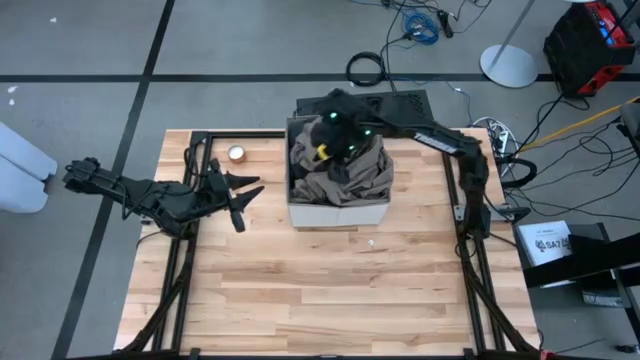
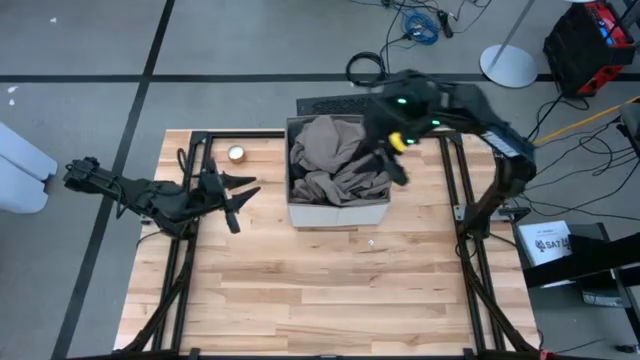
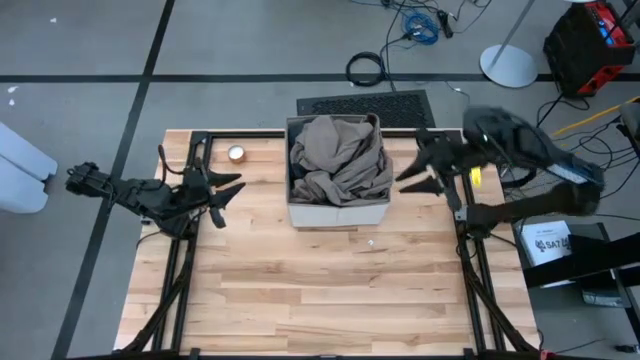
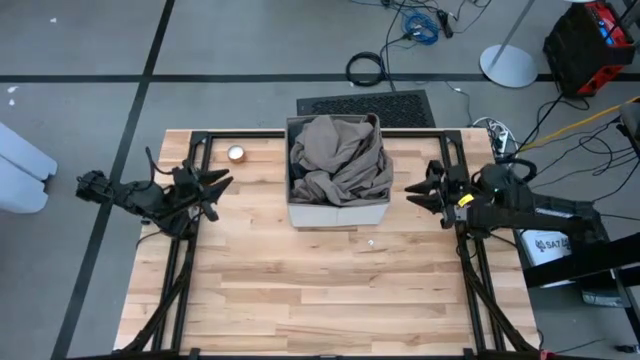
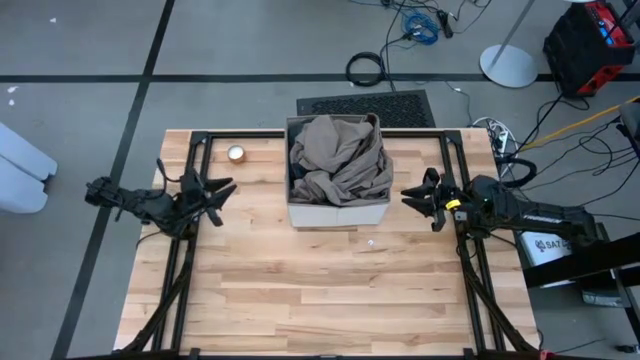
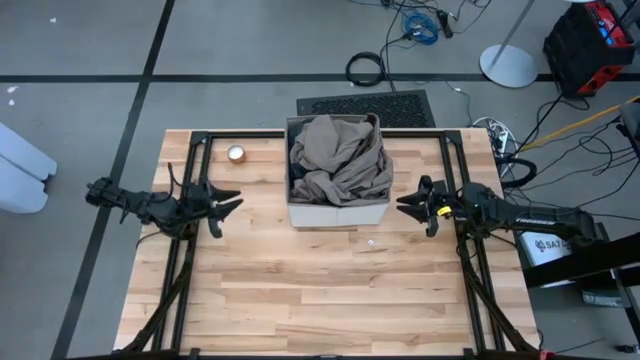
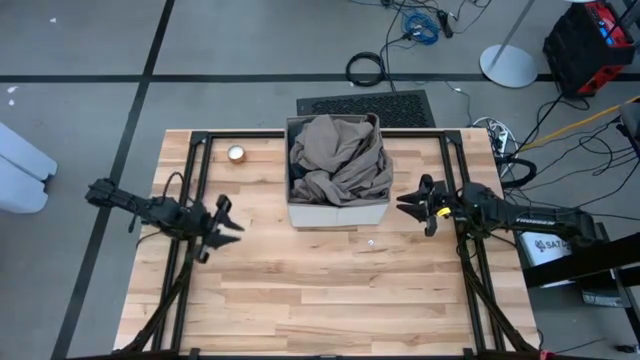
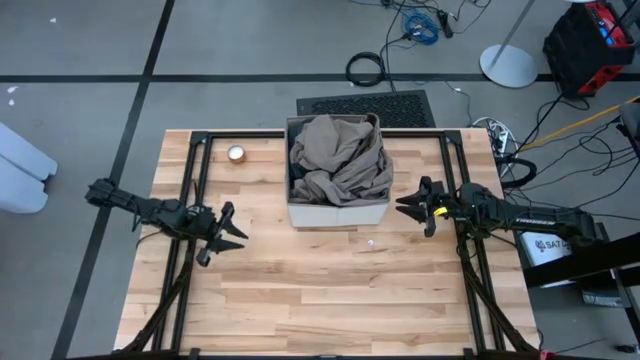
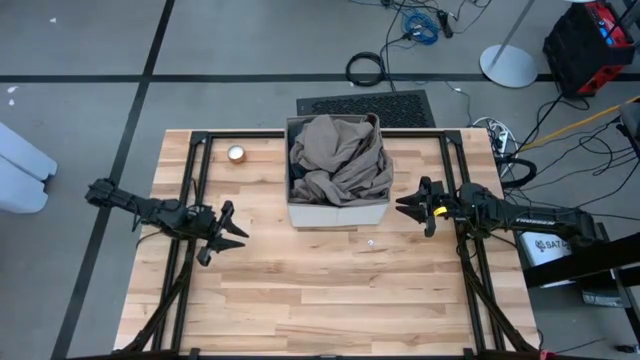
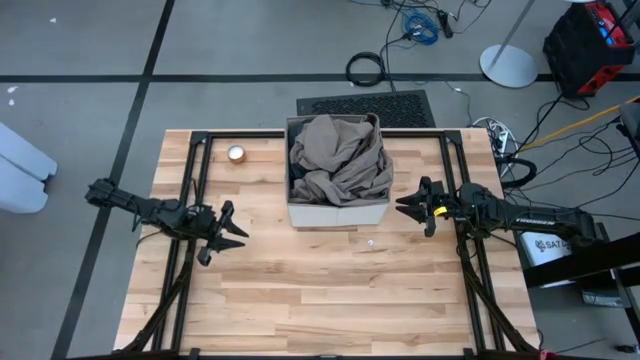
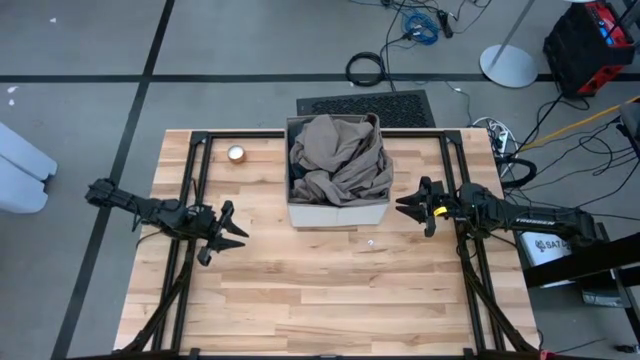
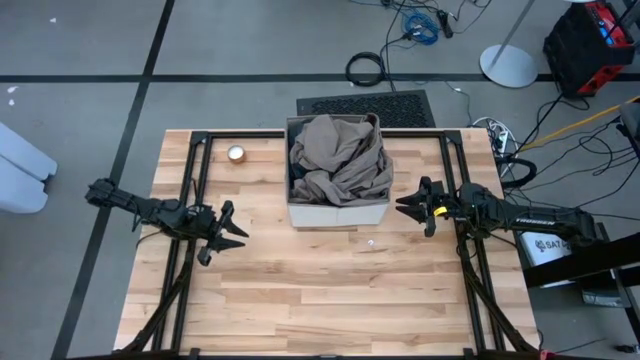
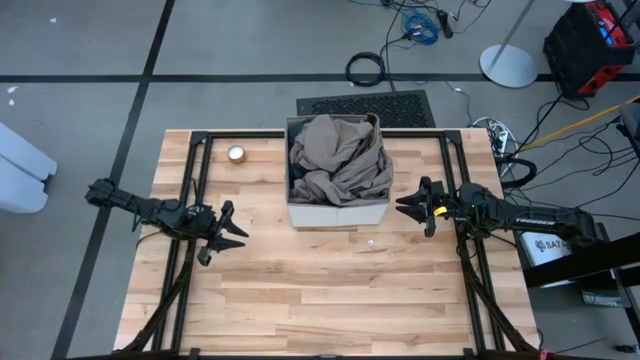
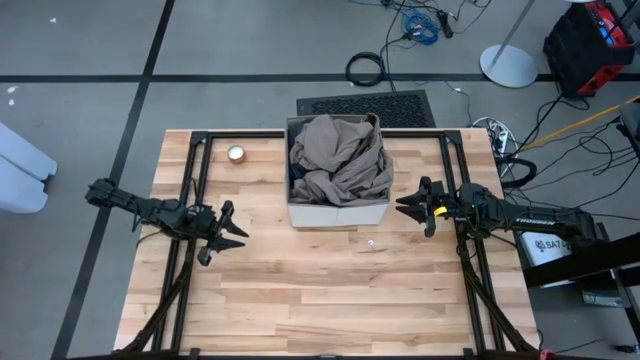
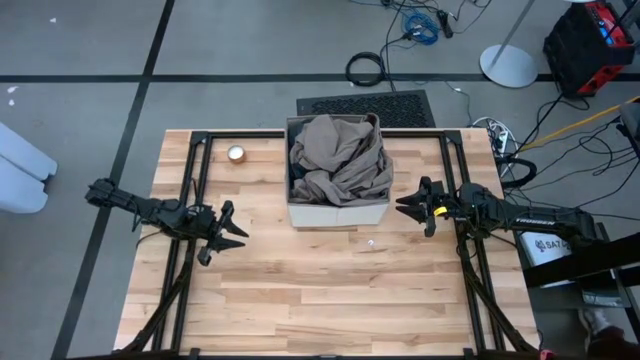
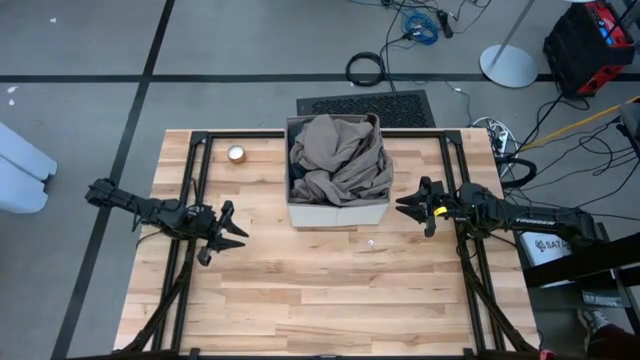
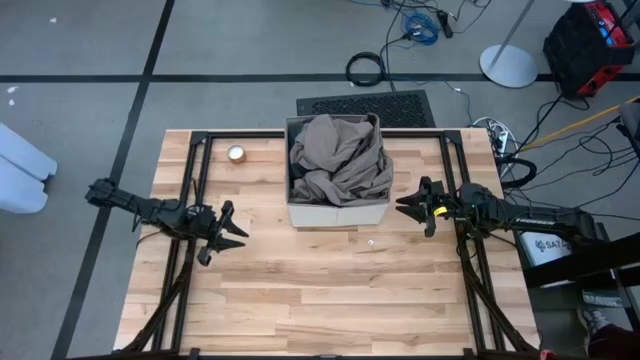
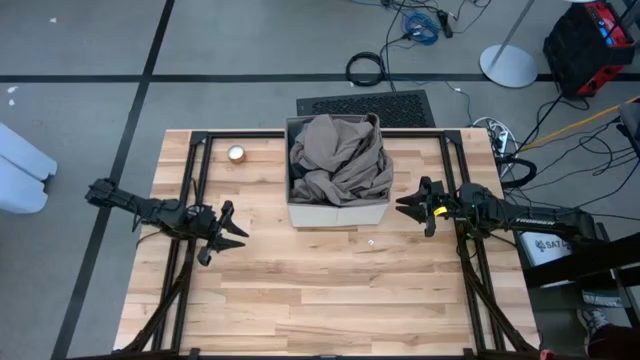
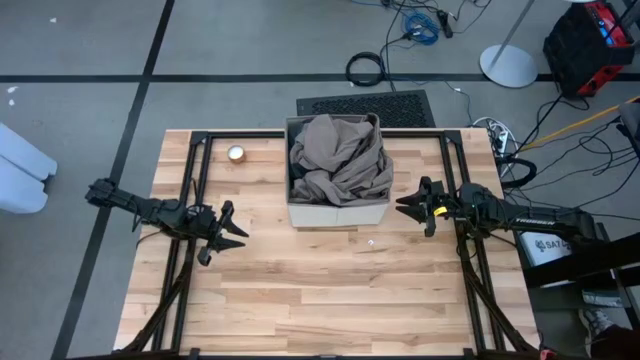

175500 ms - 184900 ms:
Task: Sort clothes
Return to Home Position

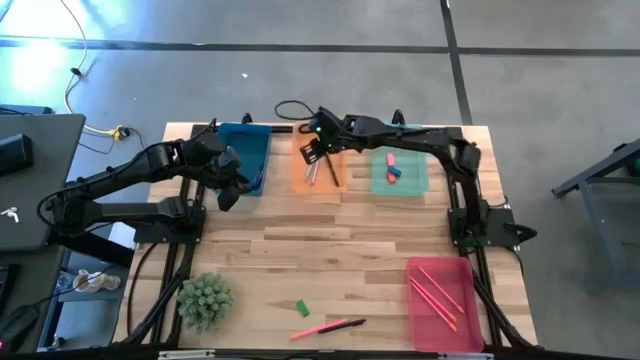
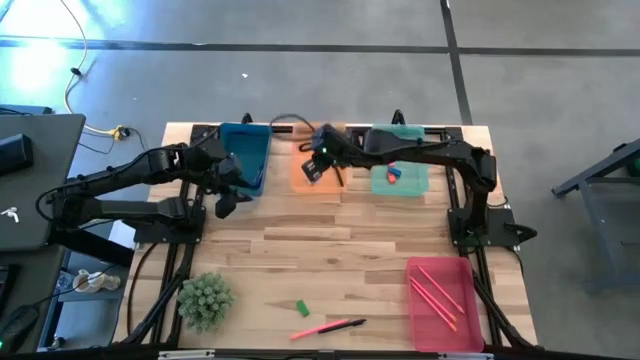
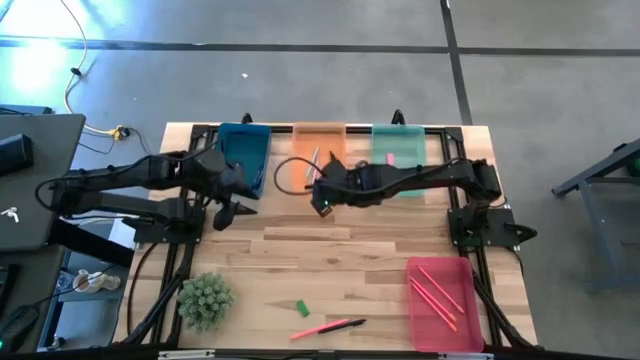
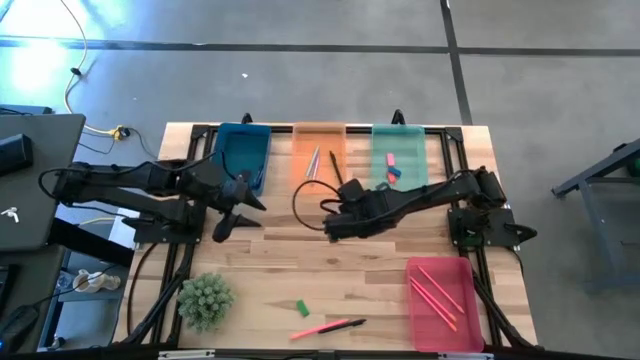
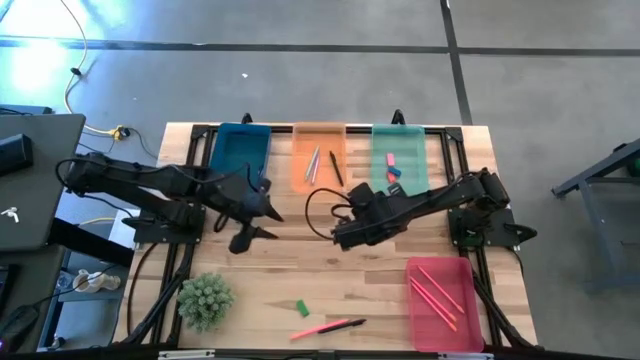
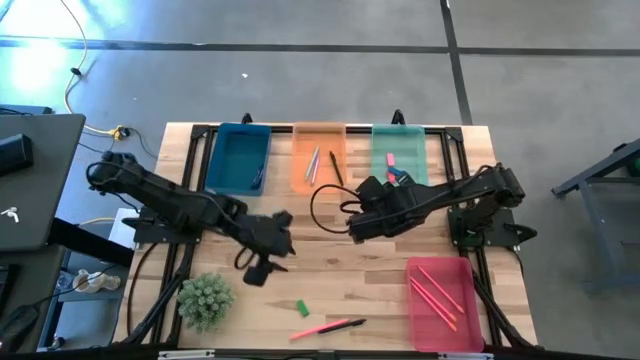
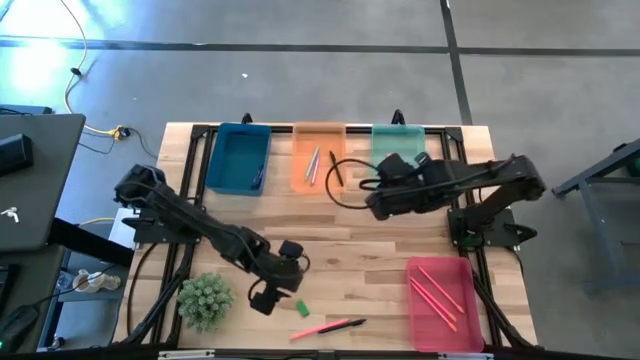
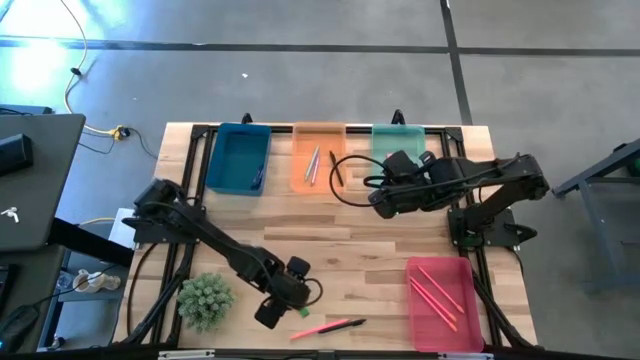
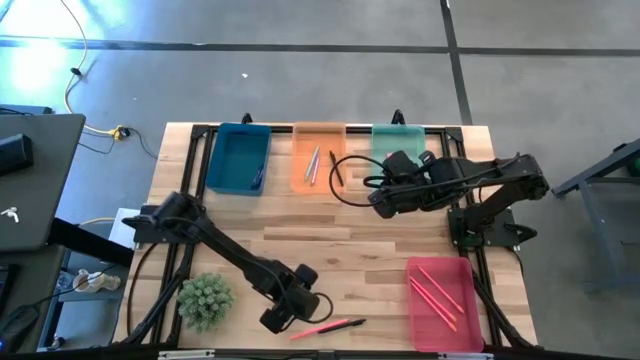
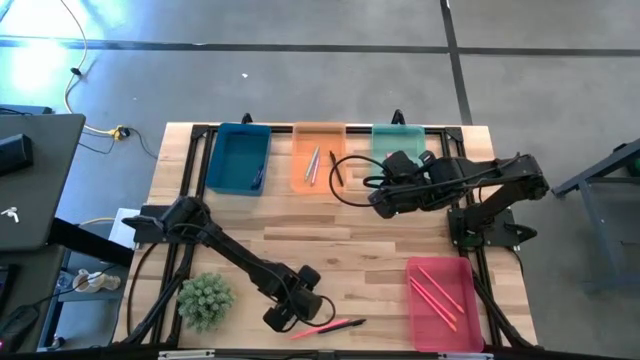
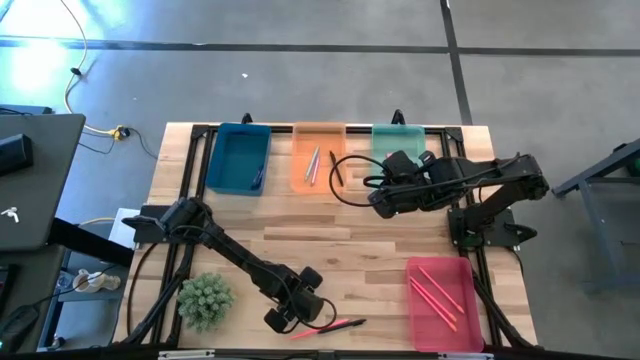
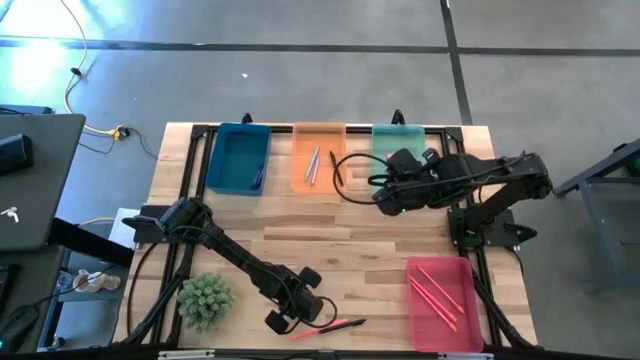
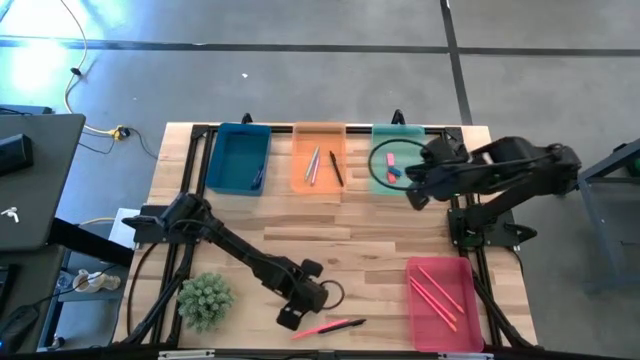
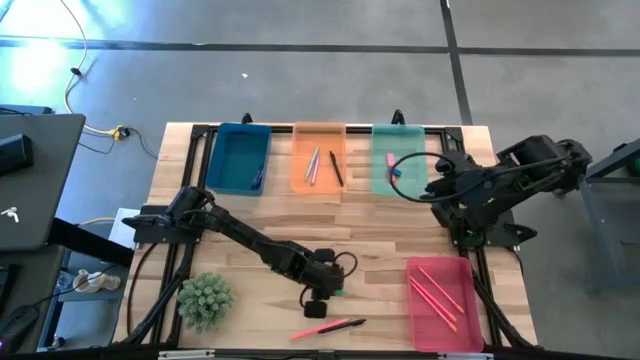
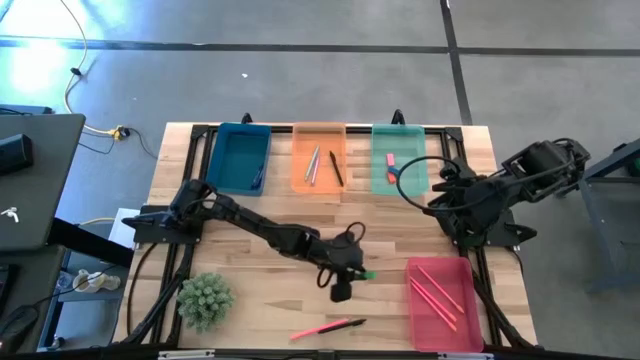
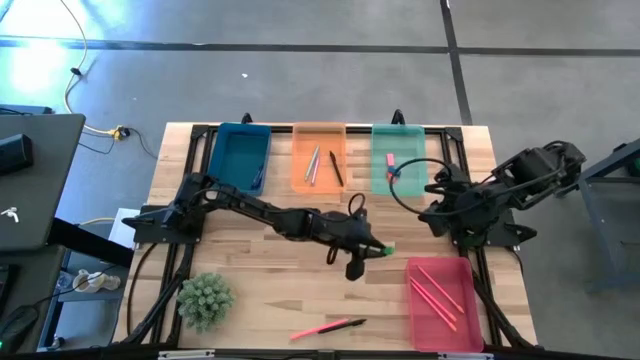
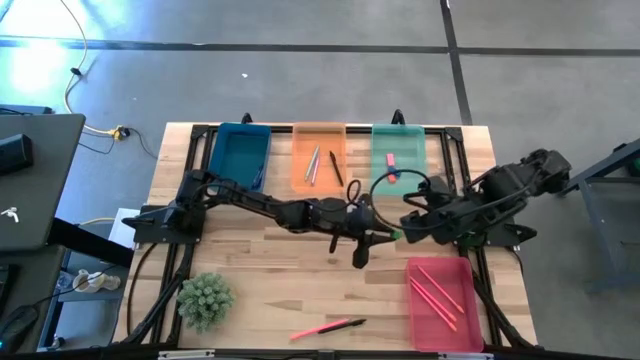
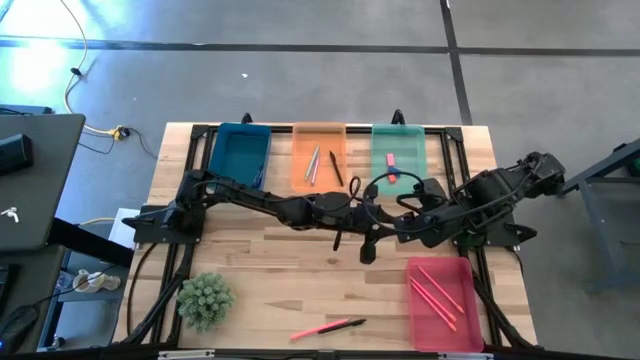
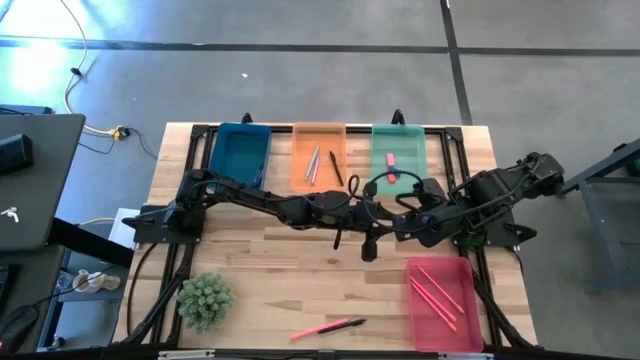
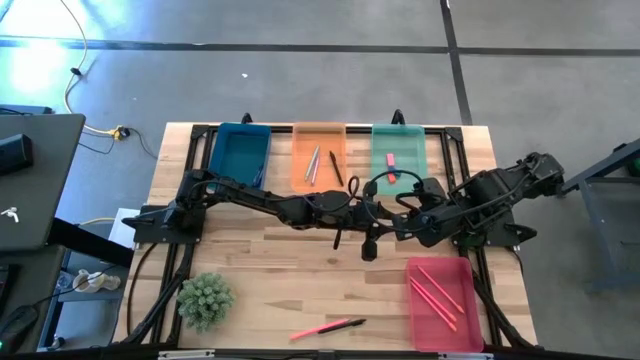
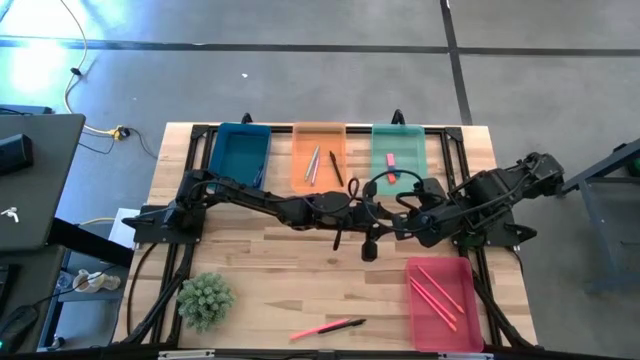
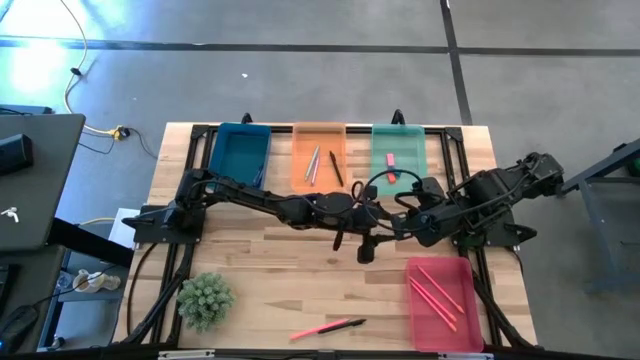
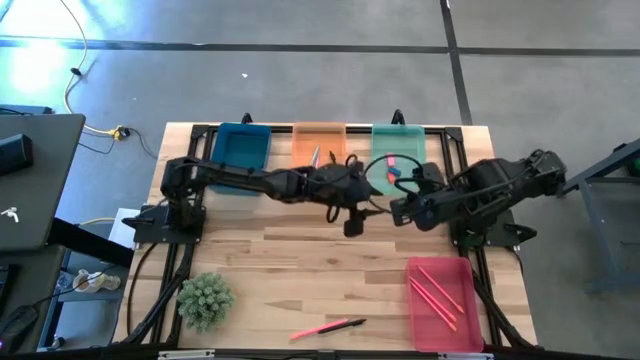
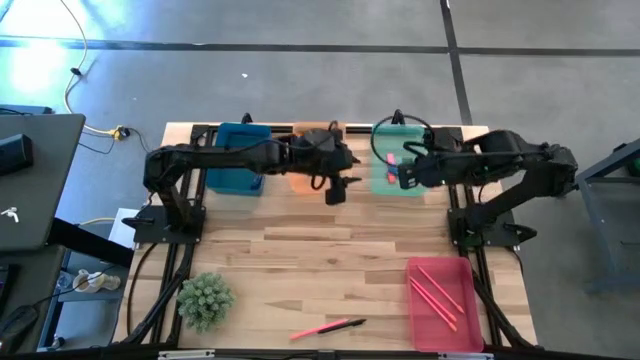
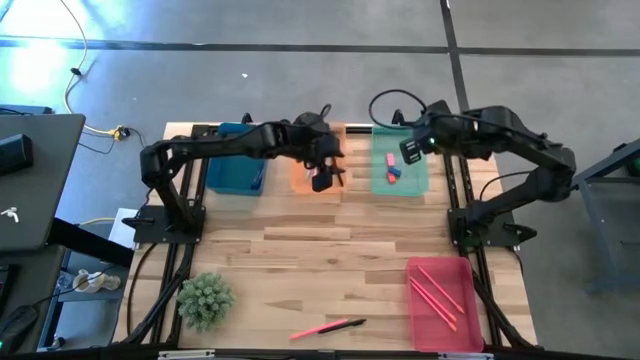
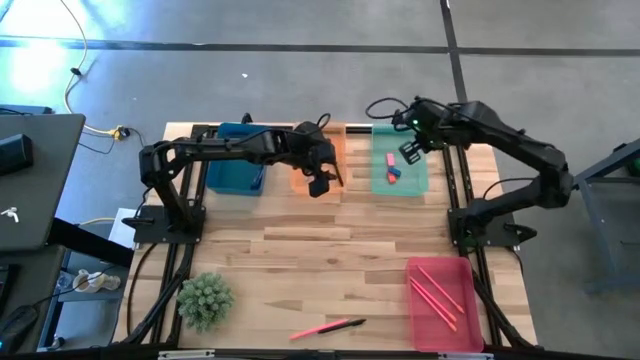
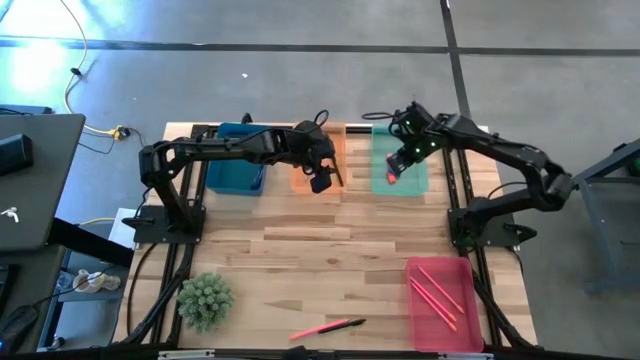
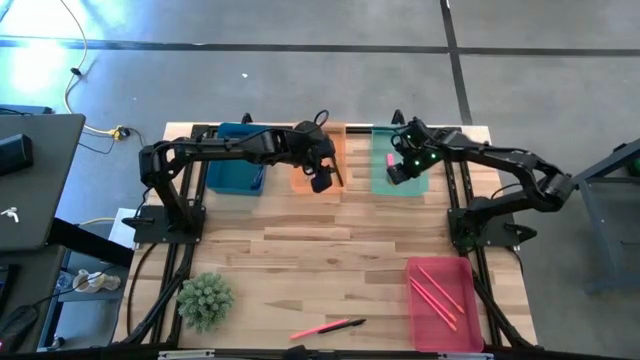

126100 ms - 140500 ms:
Task: Sort crayons/erasers/pens/pencils in bins
Put the green eraser into the green bin
